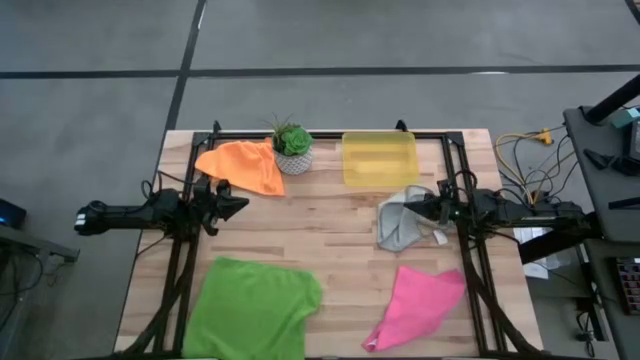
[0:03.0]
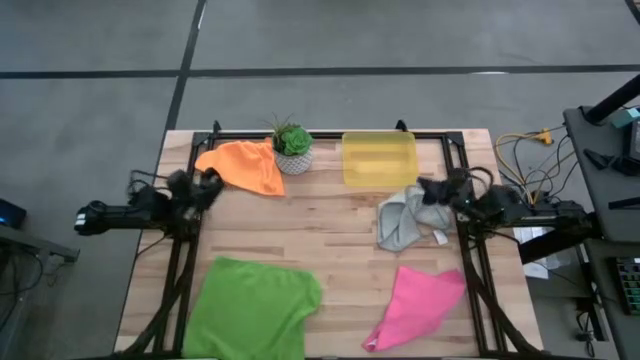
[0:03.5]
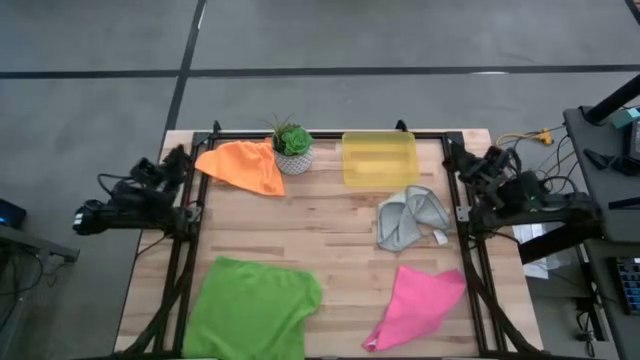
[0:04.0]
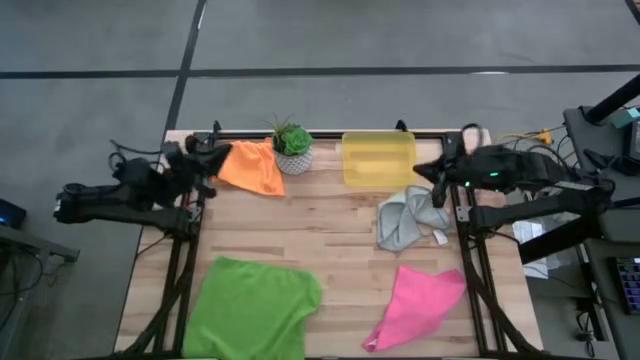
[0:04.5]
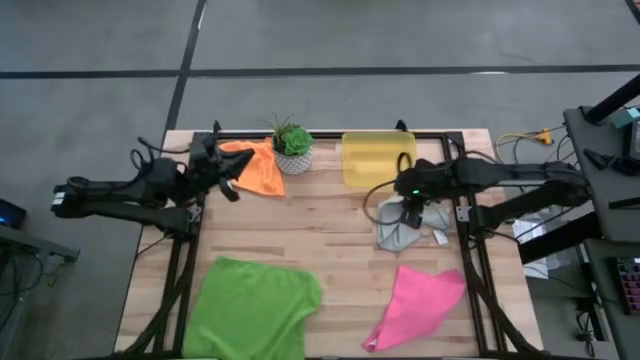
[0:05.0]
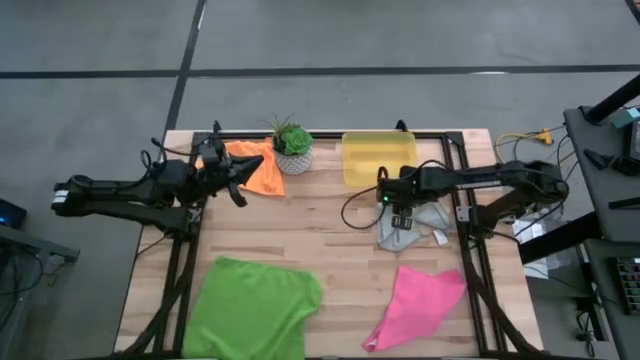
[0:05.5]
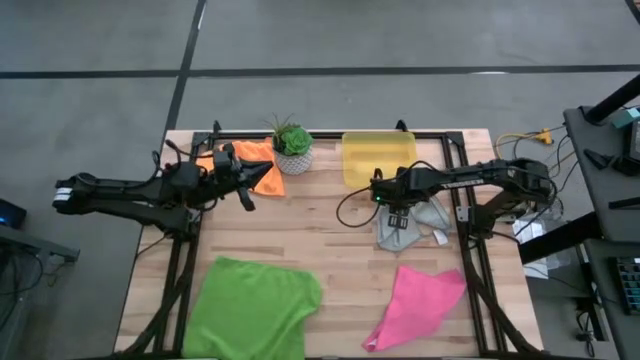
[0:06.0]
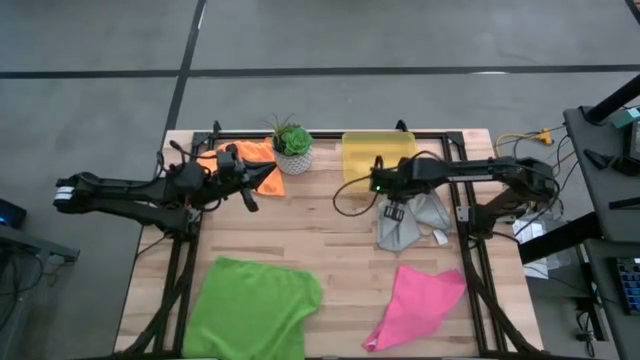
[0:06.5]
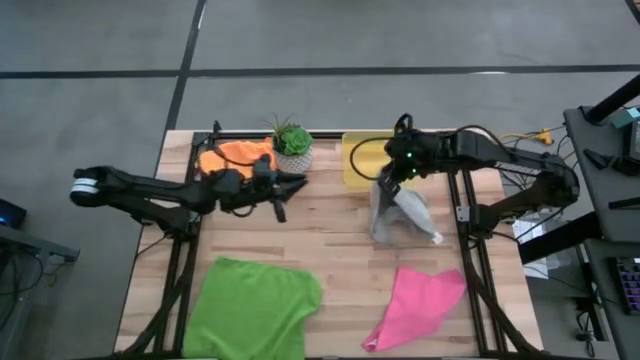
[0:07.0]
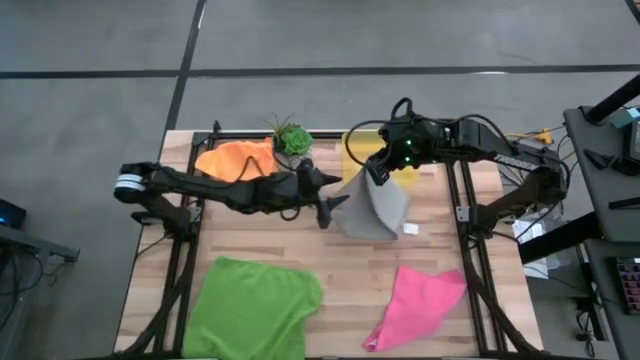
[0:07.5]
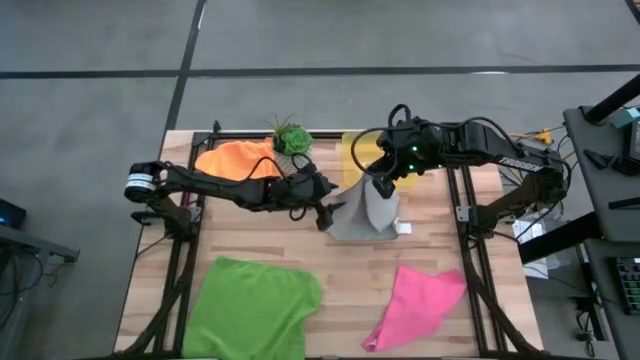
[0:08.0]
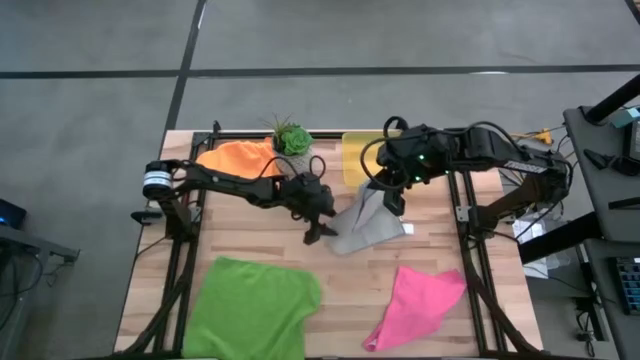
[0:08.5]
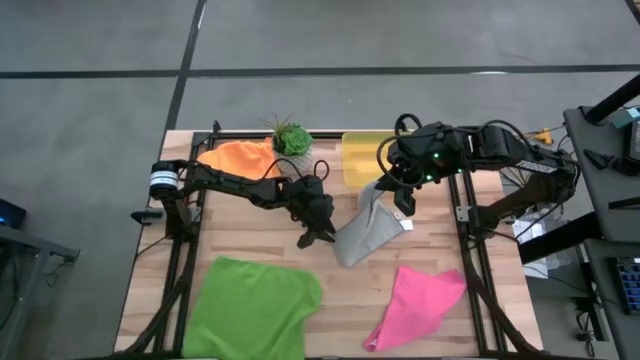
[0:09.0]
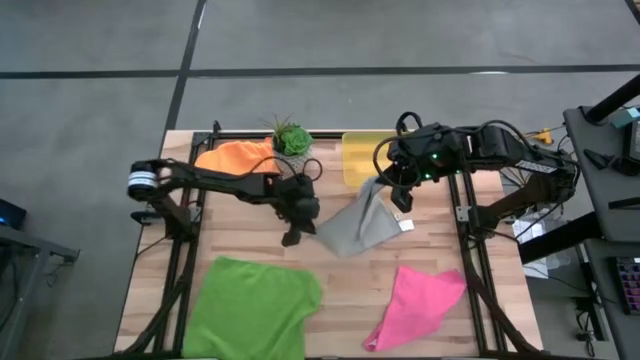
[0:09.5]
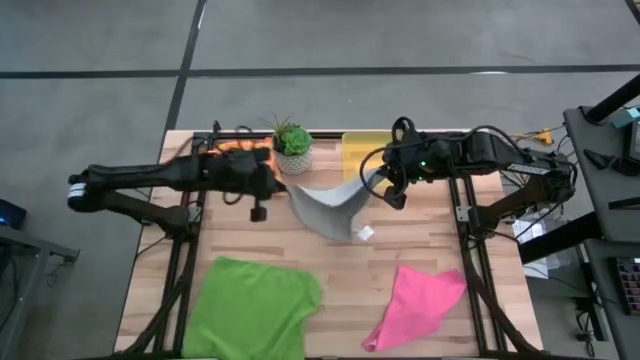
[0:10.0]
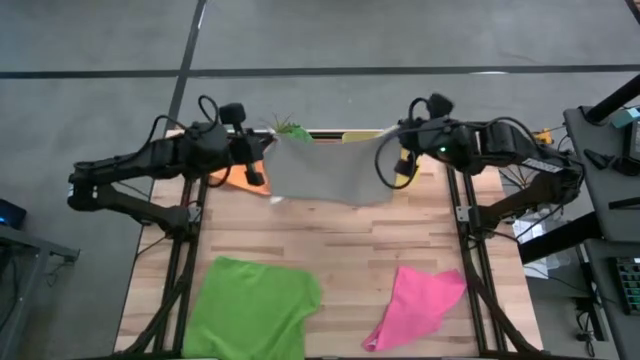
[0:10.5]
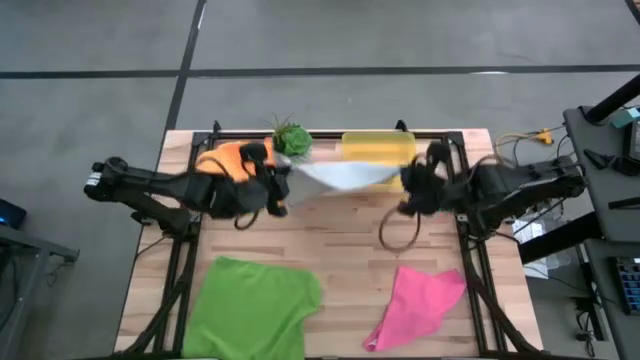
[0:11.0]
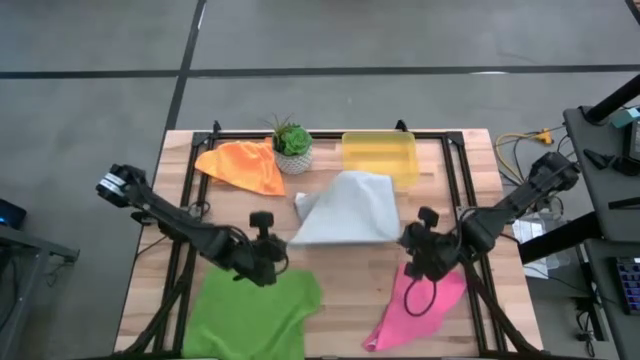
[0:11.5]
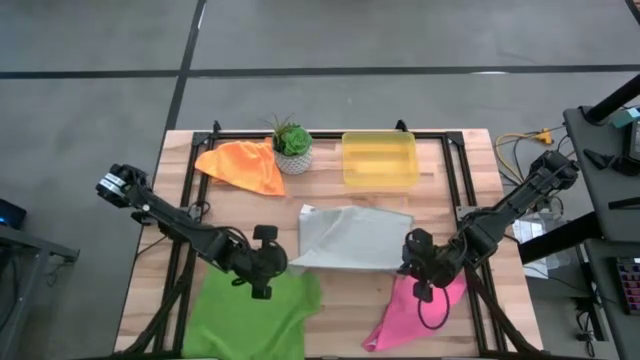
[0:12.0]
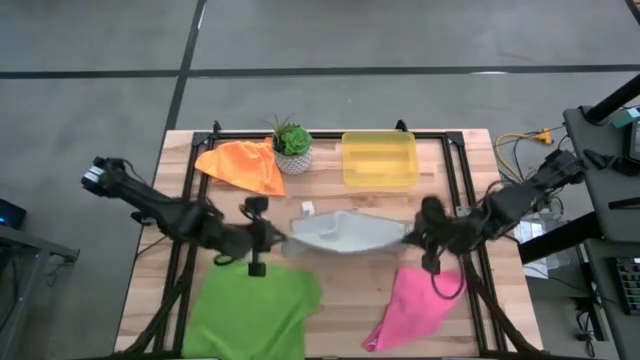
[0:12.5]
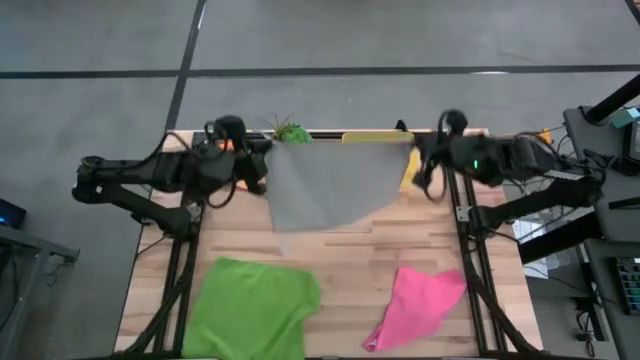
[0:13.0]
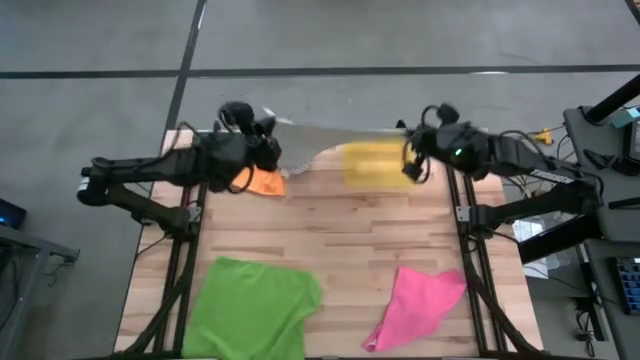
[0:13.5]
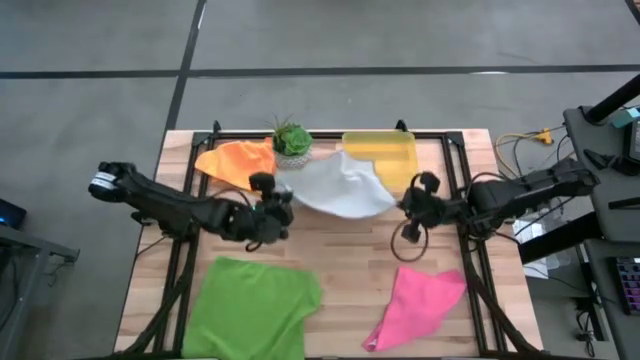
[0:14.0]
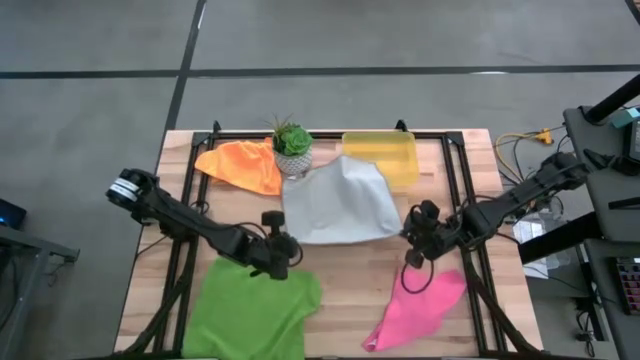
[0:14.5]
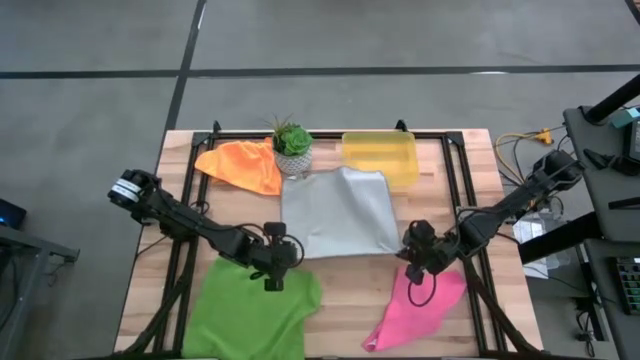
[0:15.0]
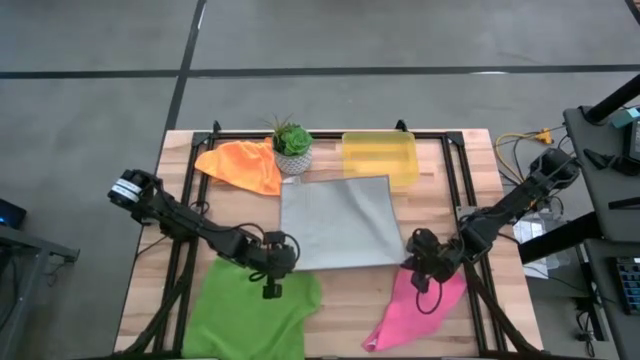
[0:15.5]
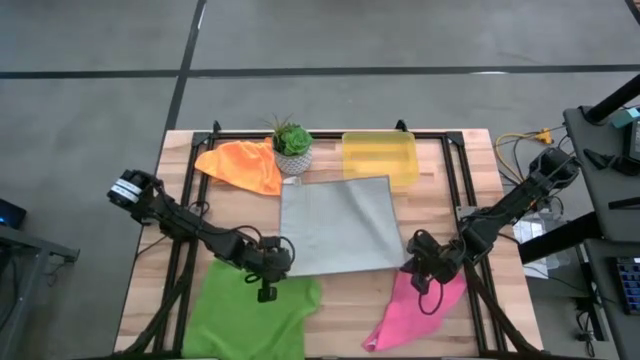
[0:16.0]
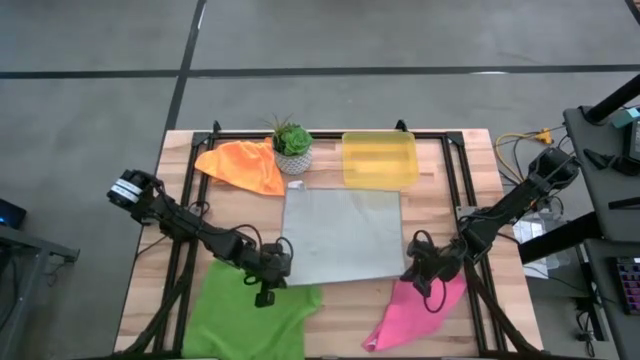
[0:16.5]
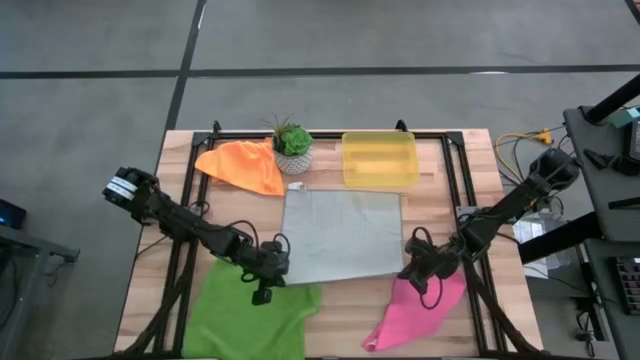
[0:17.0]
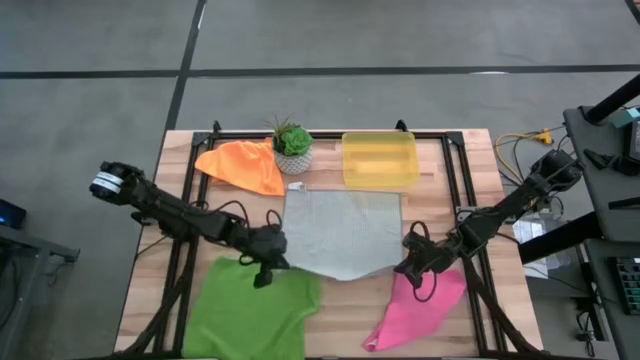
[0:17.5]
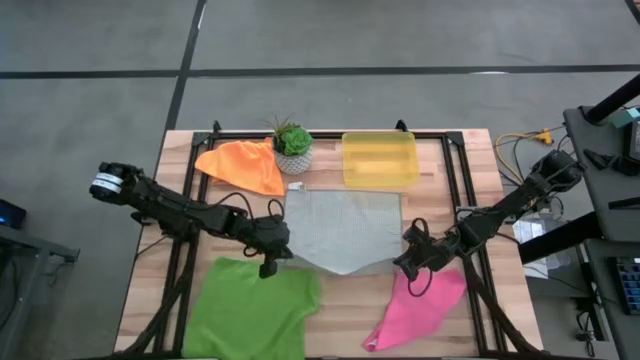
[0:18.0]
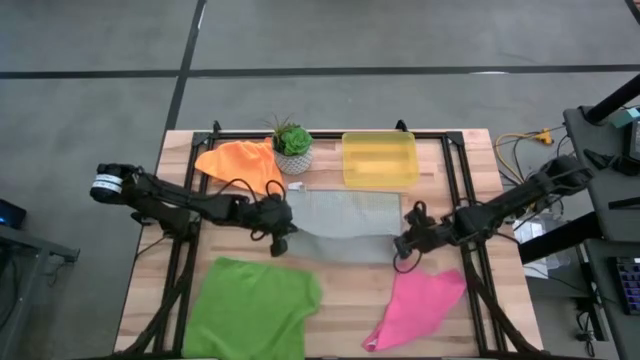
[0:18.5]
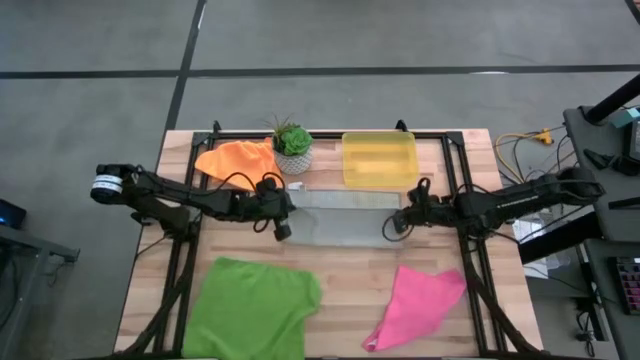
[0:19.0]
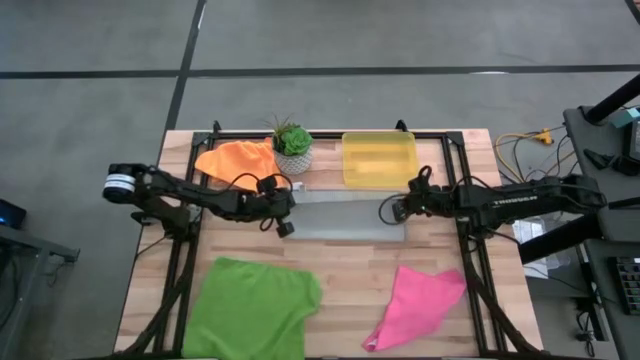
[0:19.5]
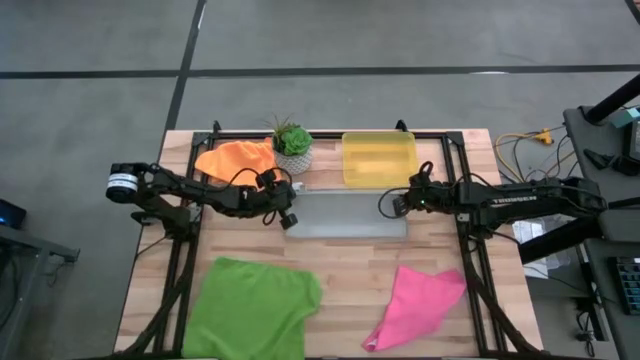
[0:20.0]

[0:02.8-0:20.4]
Task: Fold microfiber towels
Fold the gray microfiber cloth

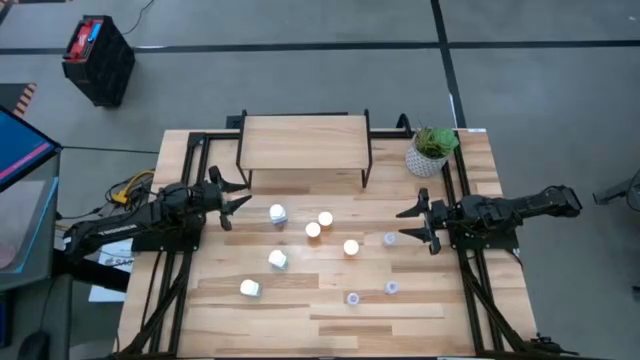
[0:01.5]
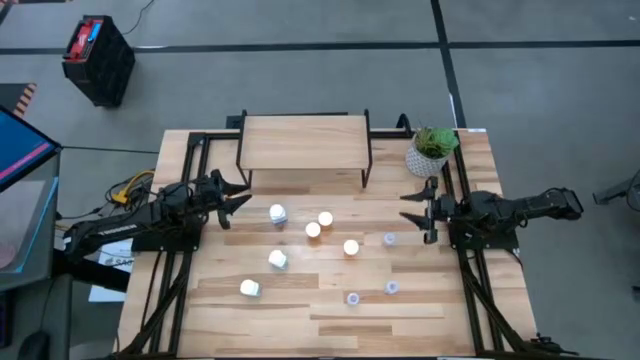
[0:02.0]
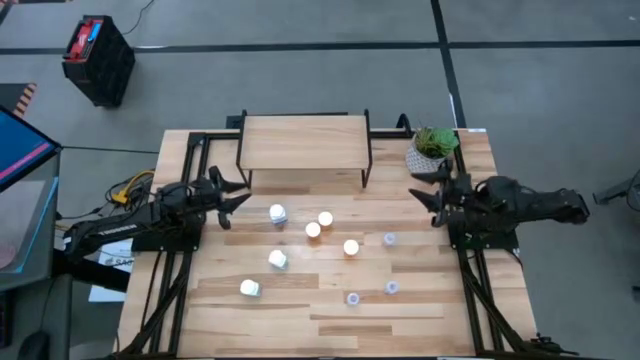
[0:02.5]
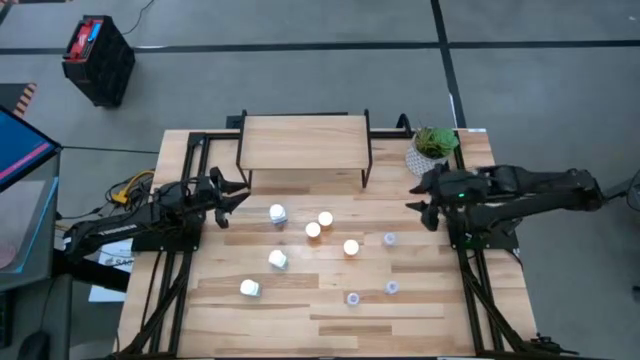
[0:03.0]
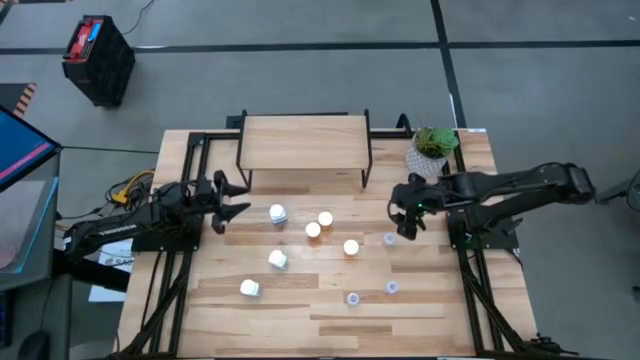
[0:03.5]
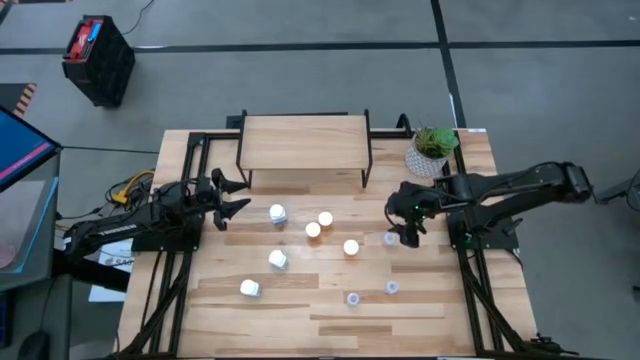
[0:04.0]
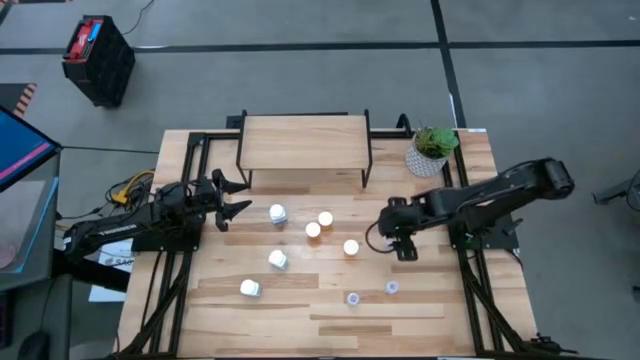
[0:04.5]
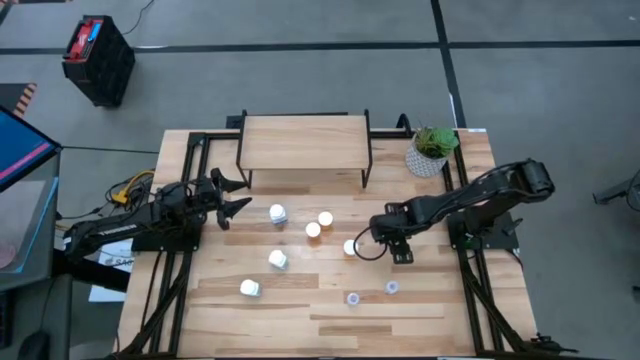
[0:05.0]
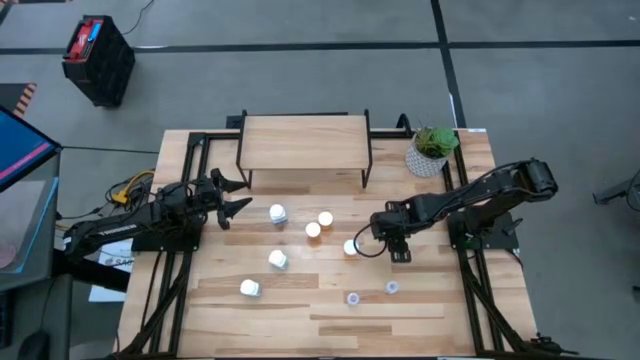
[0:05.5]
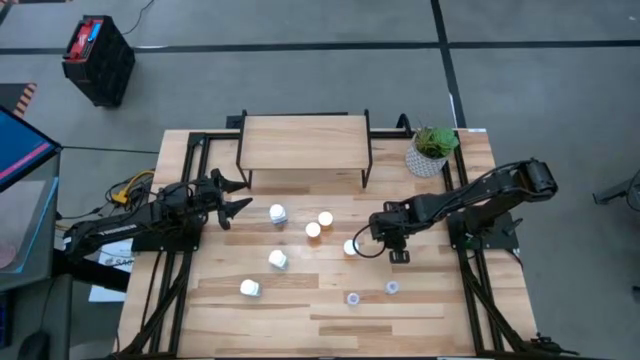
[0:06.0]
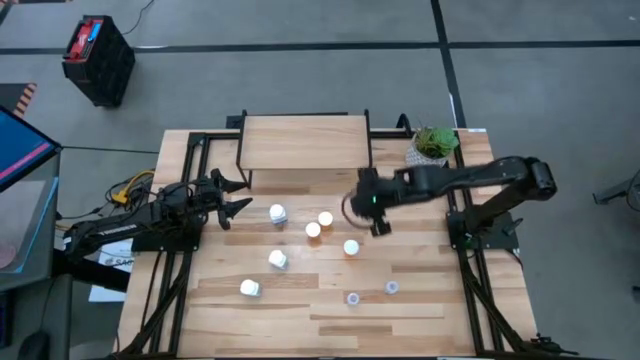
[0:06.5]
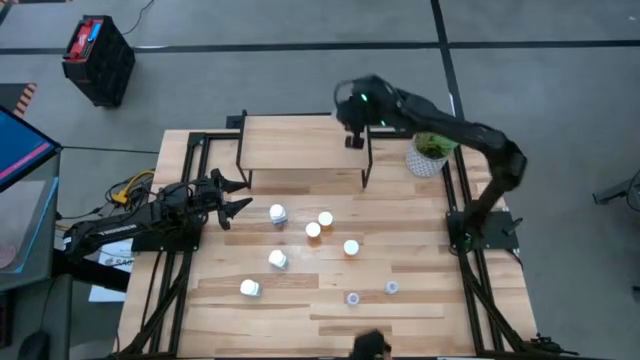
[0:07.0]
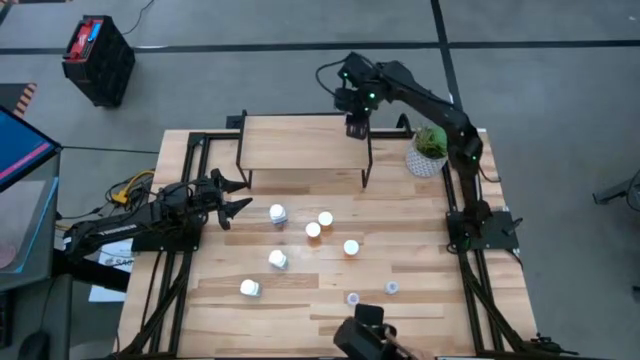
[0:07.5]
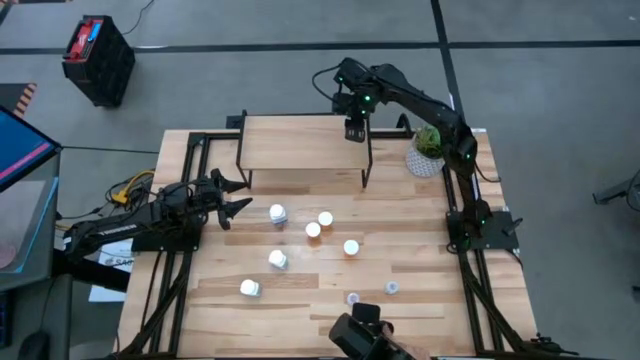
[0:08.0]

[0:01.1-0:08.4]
Task: Pick and place medicine bottles onto shelf by color
Put the top transparent pill bottle on the shelf
